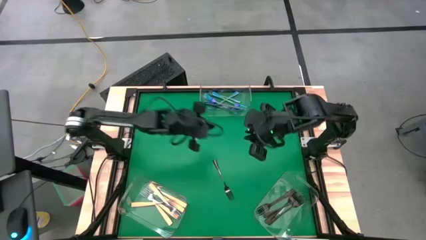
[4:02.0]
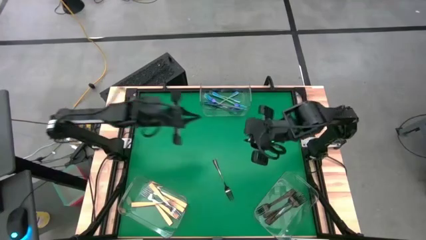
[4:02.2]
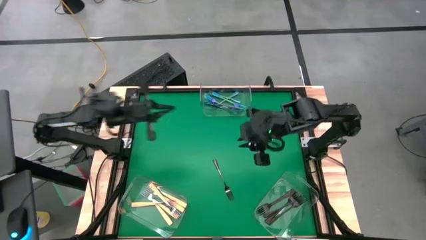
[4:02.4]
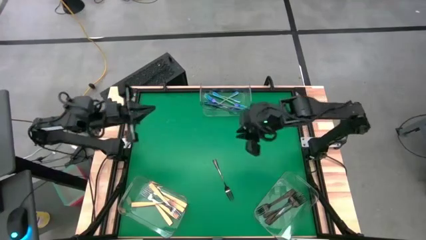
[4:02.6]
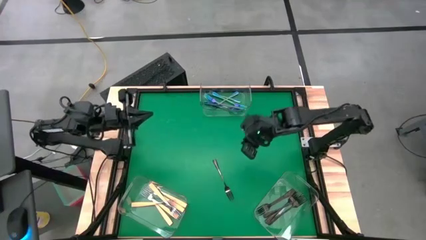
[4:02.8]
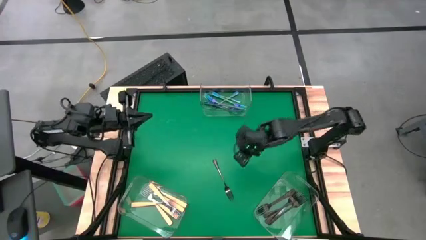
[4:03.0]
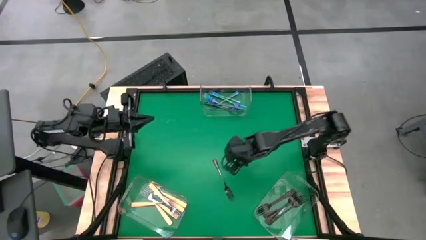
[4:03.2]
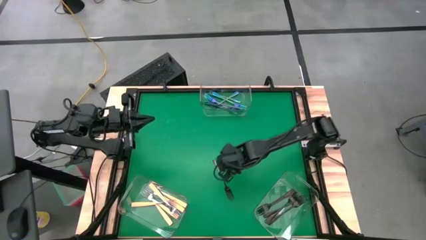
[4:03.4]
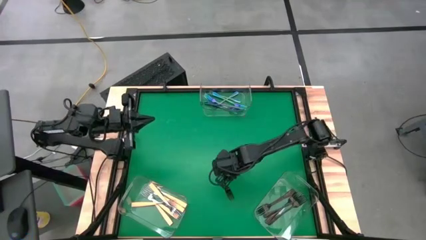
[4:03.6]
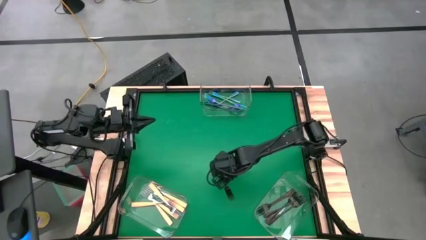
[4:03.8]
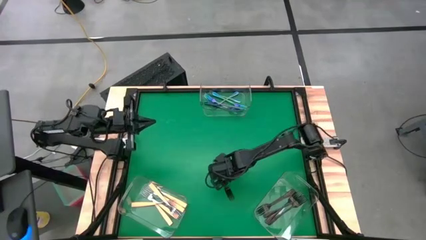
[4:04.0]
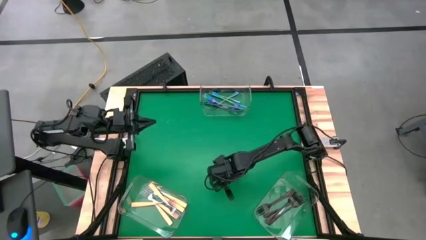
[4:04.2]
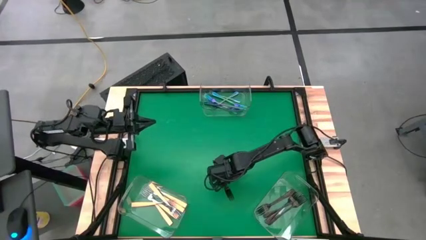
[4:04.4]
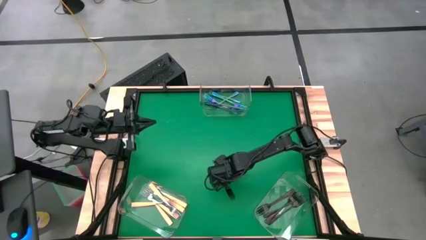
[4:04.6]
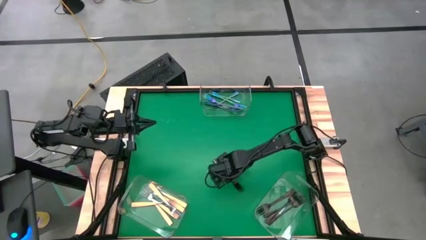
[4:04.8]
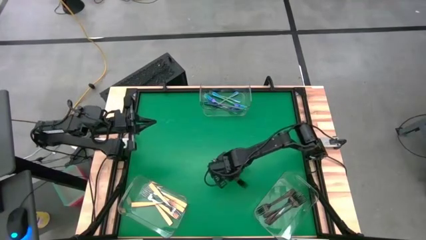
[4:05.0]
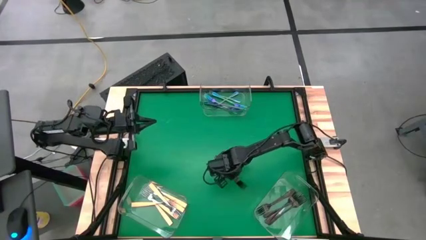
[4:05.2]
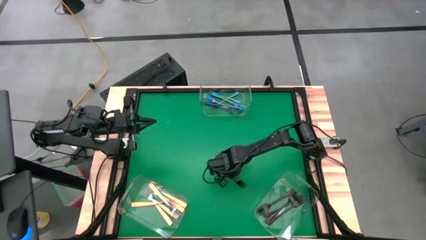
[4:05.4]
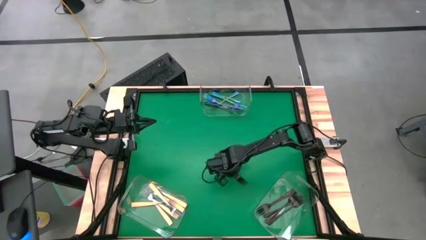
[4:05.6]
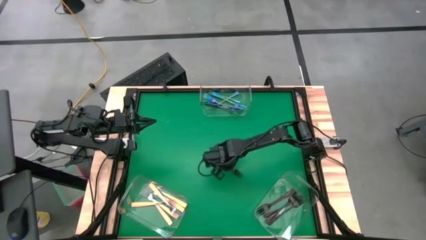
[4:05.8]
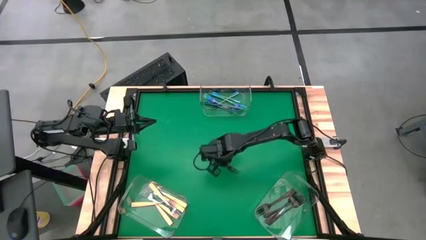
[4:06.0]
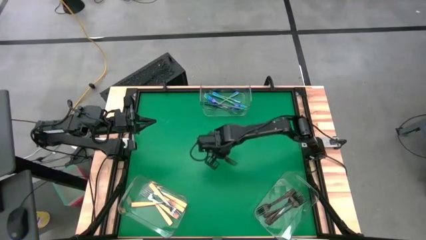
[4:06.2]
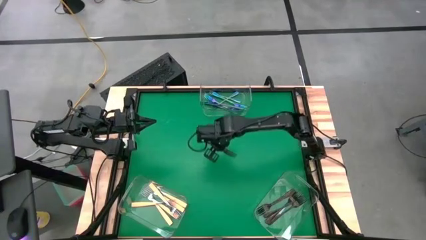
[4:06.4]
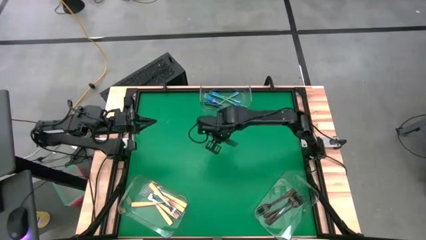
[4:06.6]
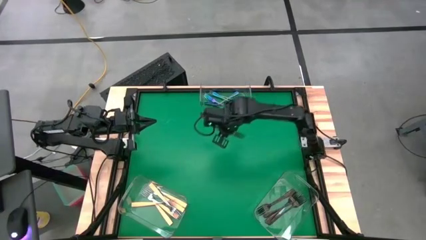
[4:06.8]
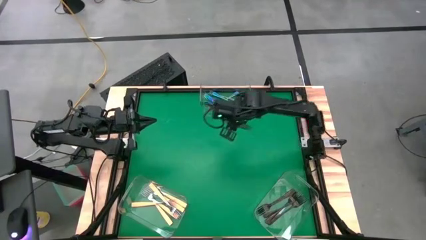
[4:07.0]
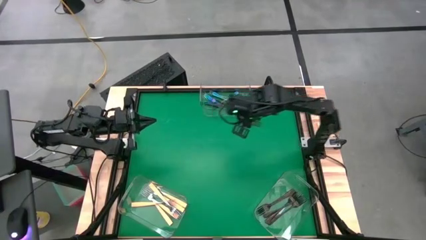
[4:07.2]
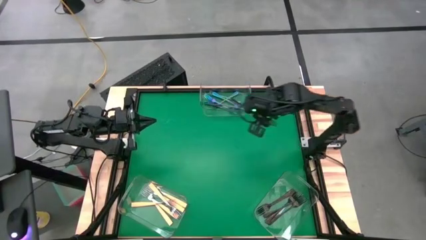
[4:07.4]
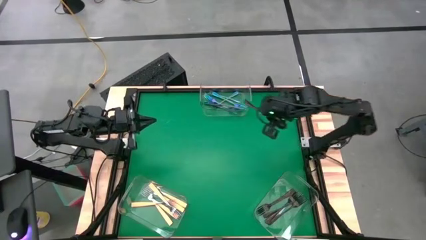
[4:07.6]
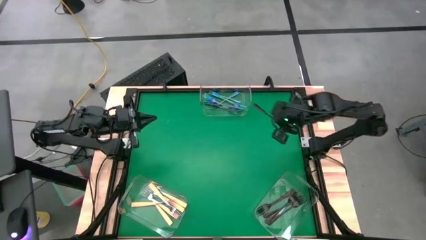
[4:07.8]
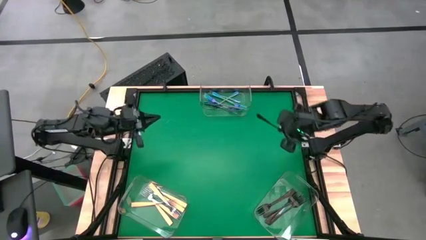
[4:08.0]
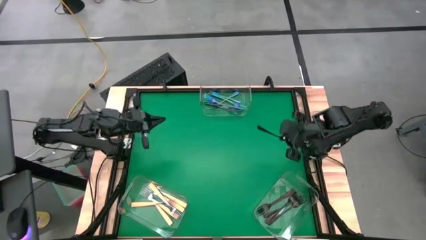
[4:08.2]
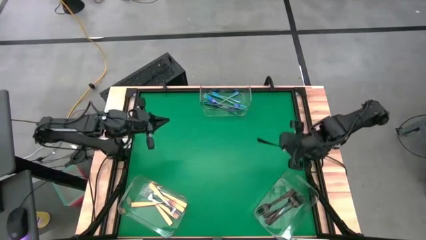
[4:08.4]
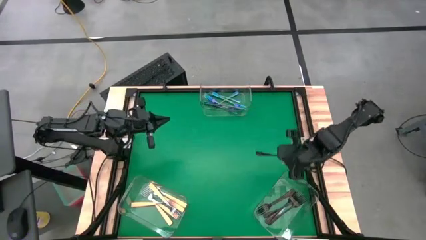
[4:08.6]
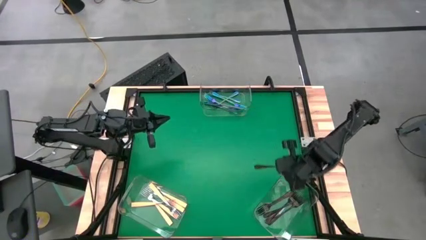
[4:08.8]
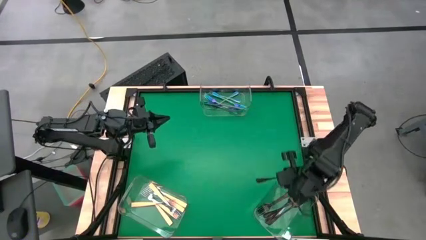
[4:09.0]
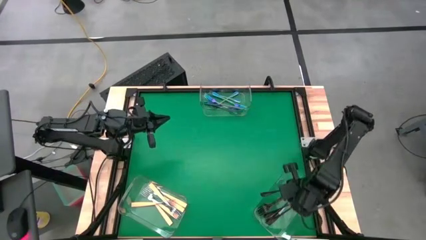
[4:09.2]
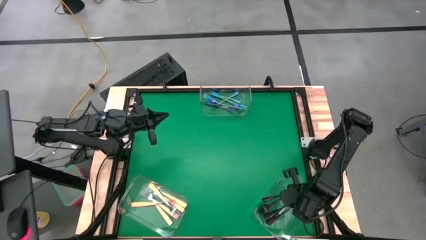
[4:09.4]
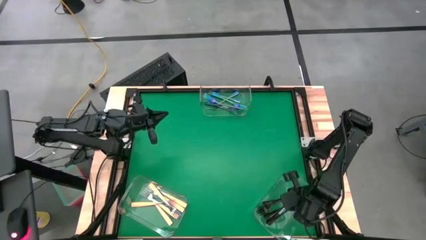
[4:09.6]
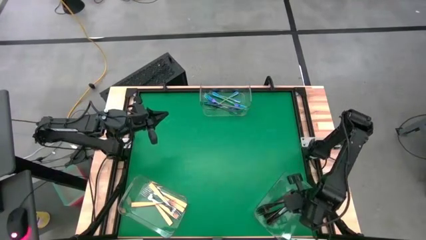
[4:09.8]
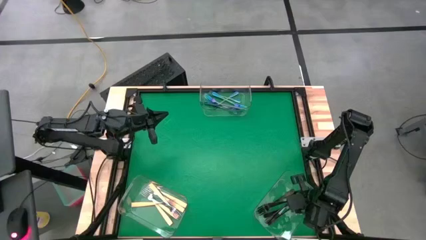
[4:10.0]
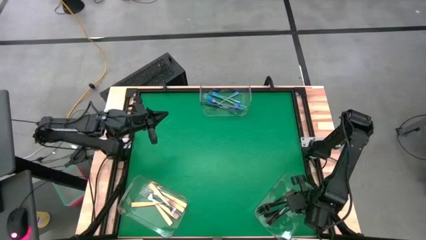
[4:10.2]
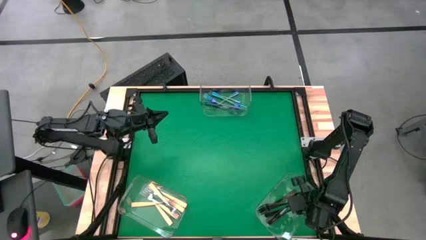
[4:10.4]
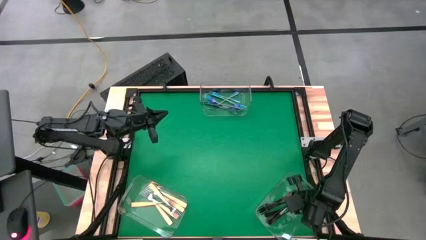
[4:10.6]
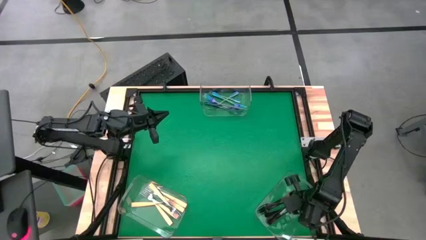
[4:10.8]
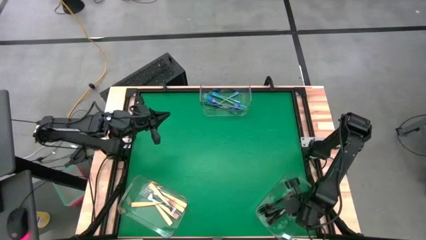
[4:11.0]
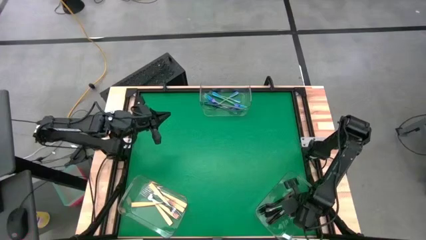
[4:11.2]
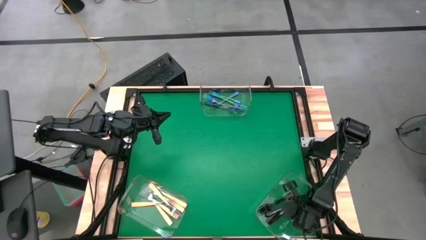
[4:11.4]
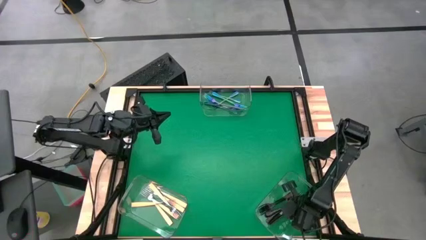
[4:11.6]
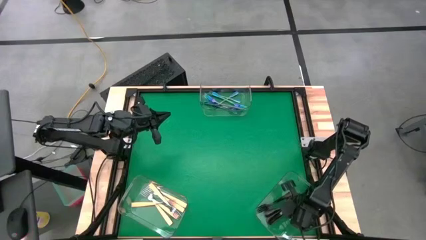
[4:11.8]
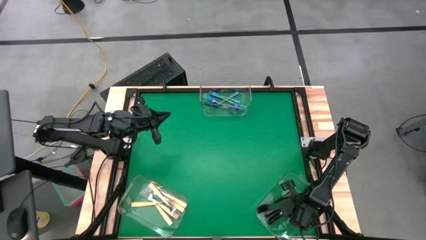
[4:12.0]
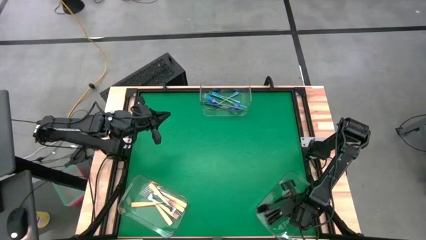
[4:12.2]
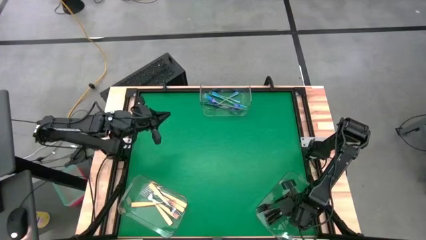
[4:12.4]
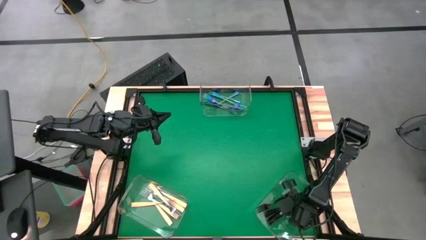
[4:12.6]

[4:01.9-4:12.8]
Task: Sort silverware by color (type)
Put the black fork into the bottom right transparent bin

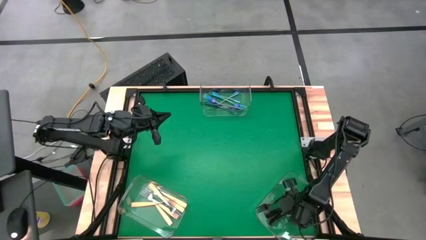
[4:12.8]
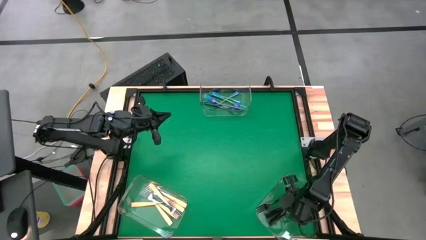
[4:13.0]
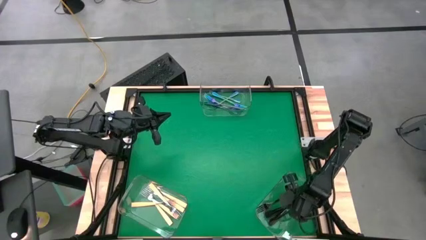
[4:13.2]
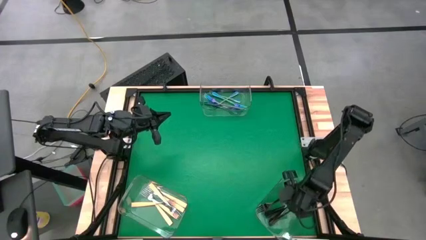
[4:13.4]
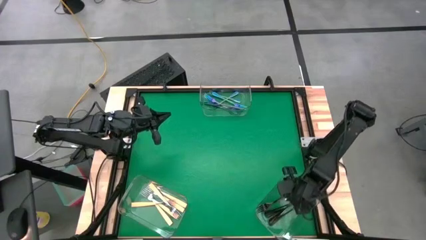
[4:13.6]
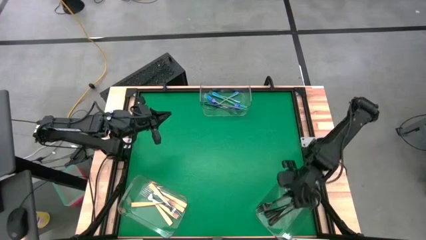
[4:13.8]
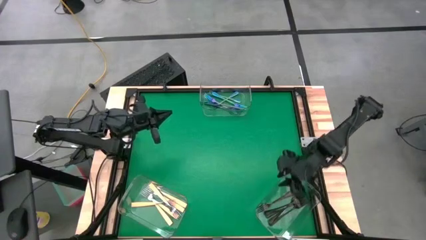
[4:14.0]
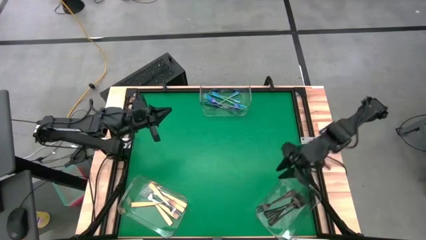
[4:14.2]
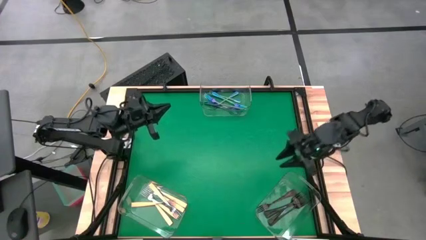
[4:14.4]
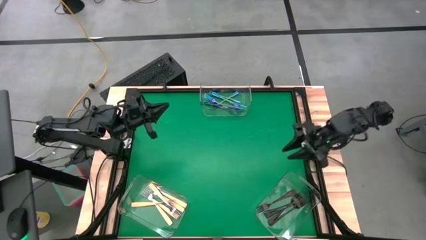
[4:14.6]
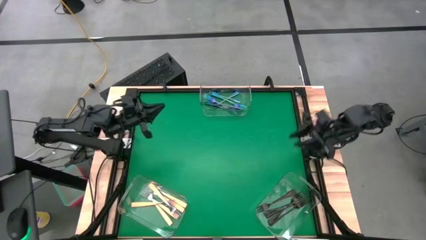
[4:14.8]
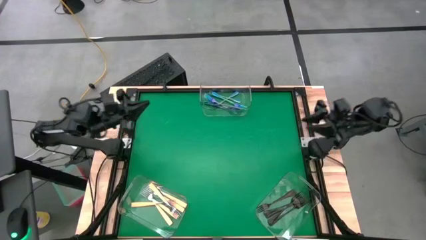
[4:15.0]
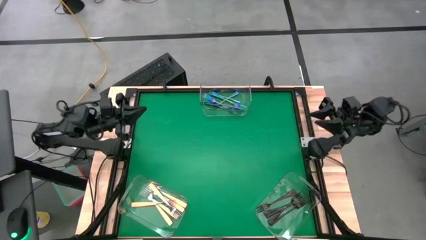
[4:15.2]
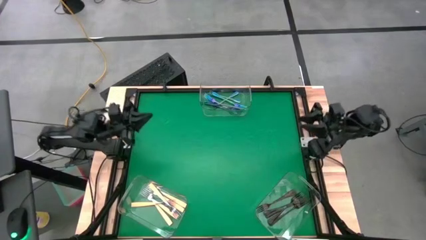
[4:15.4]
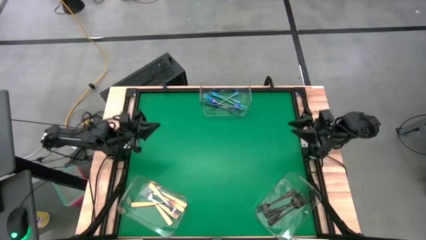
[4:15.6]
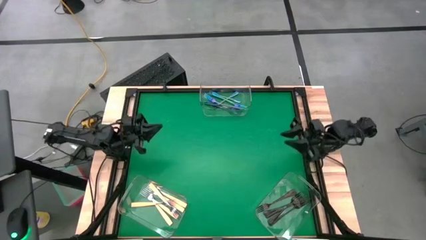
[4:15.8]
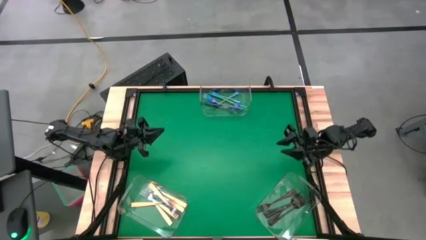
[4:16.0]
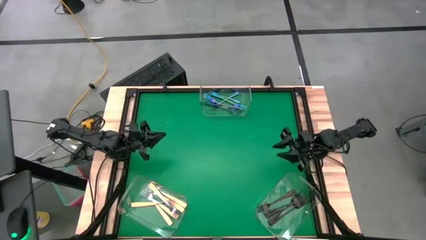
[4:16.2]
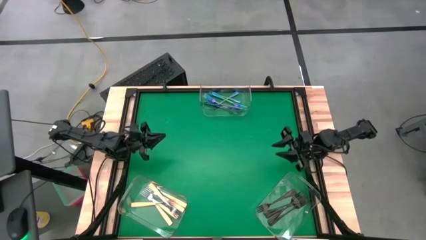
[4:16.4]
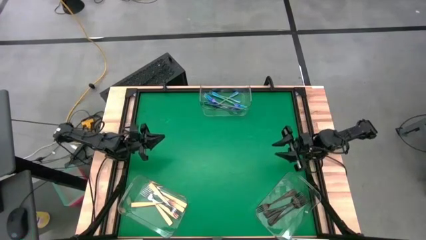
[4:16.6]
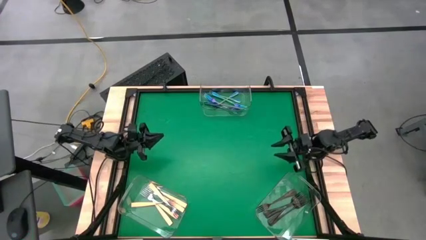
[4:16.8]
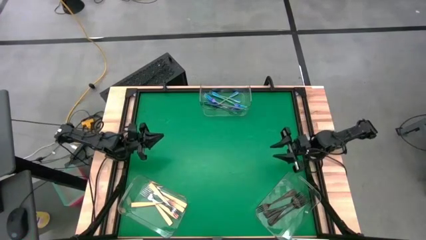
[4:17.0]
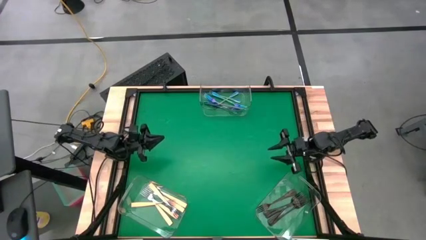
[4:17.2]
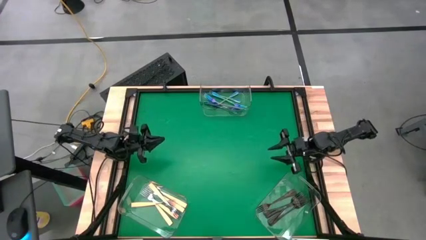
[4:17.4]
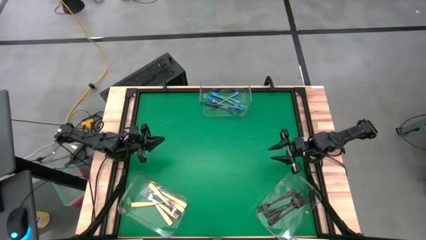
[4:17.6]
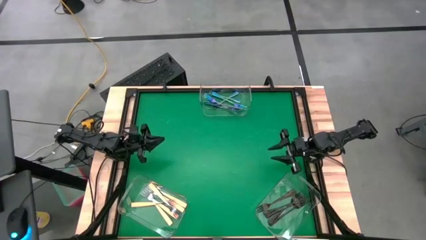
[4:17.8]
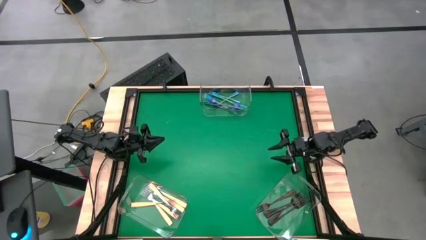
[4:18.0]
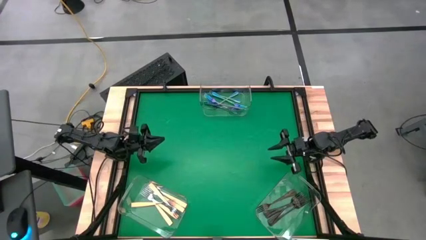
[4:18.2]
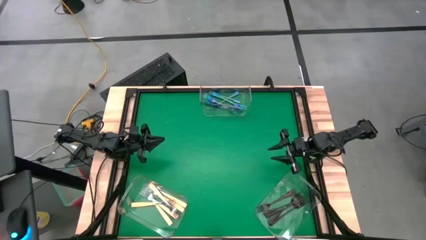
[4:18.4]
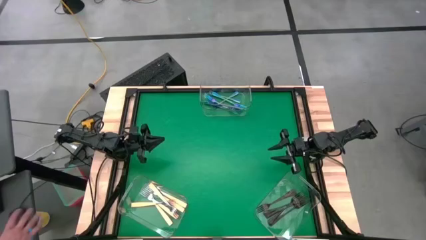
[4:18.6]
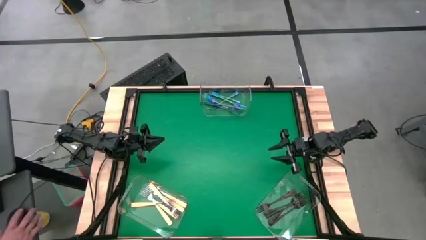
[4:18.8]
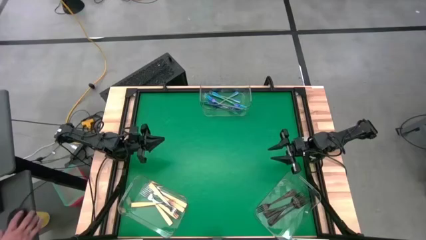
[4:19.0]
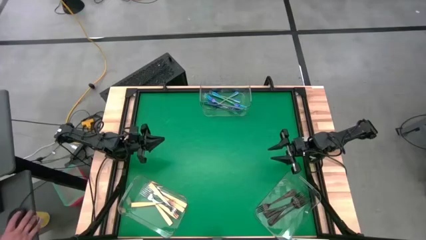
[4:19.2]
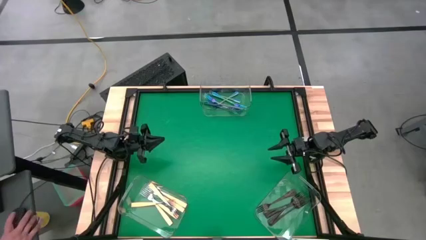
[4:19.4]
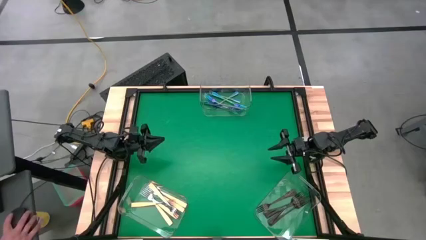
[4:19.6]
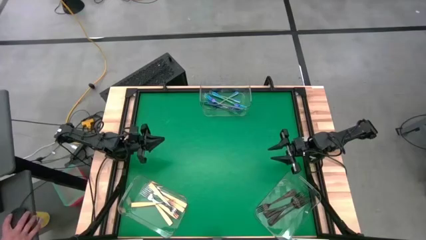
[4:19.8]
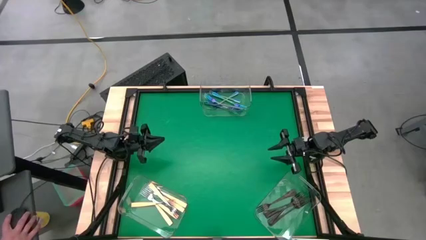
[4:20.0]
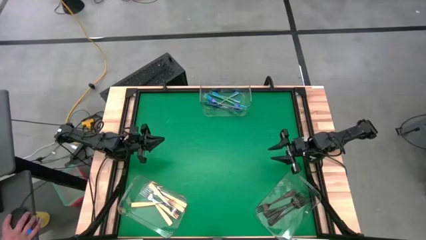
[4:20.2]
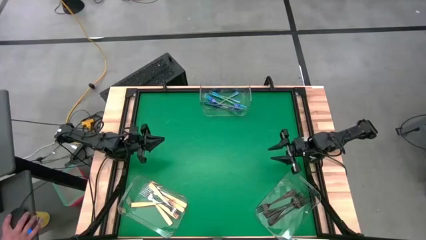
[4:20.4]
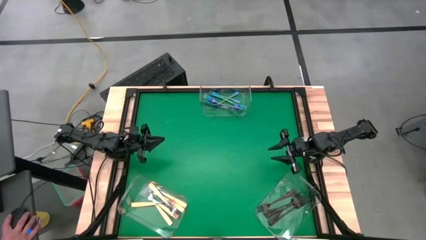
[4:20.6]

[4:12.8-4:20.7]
Return to Home Position
